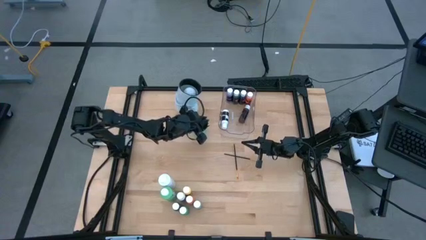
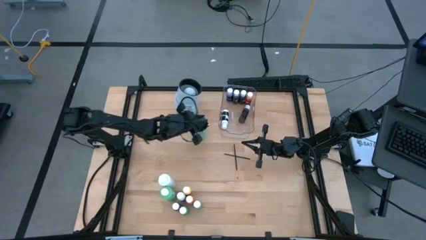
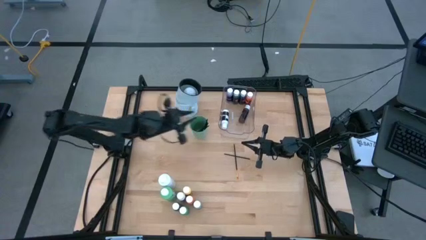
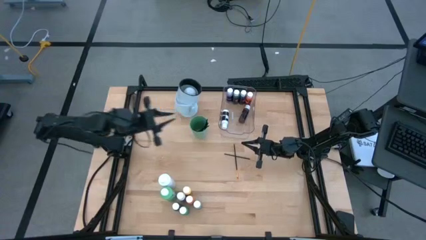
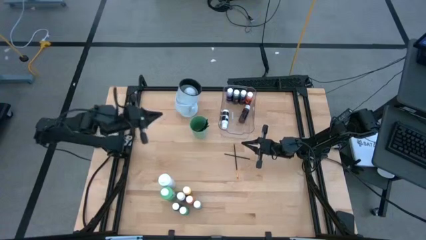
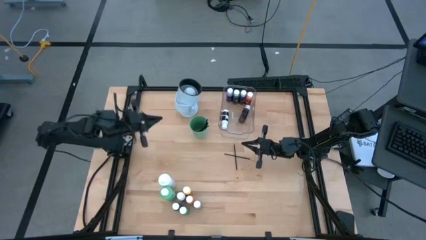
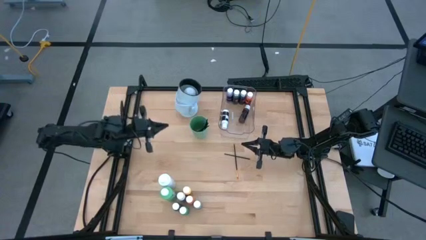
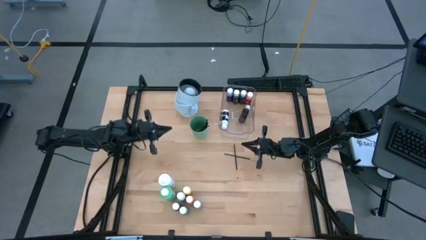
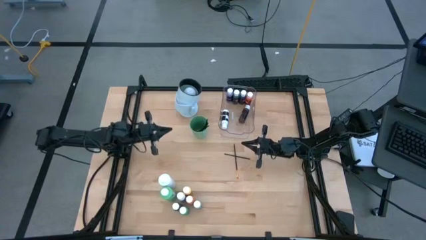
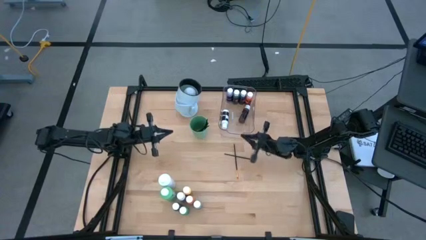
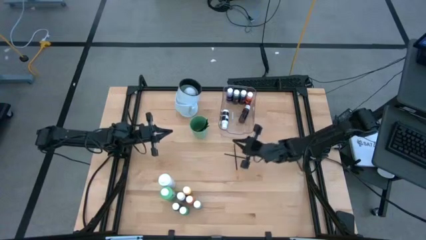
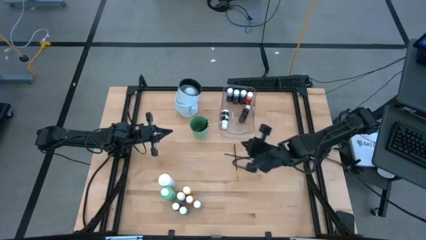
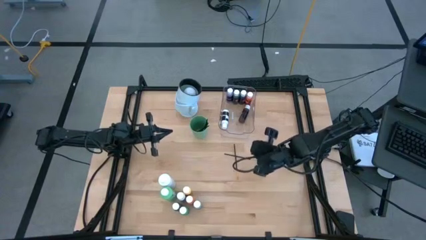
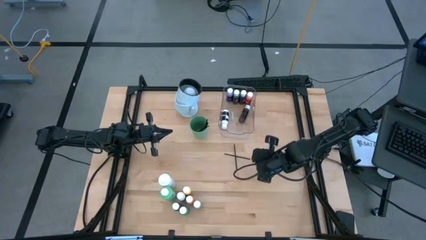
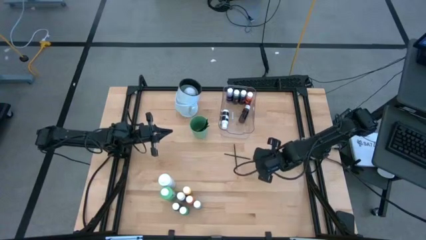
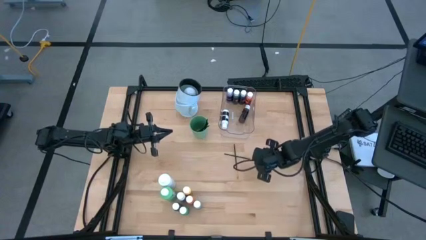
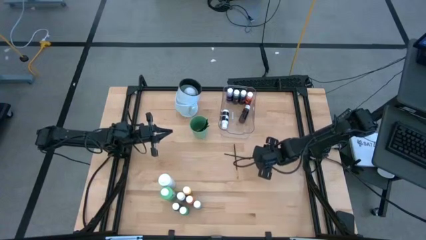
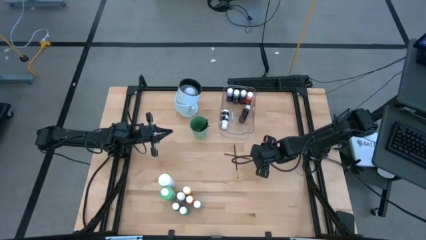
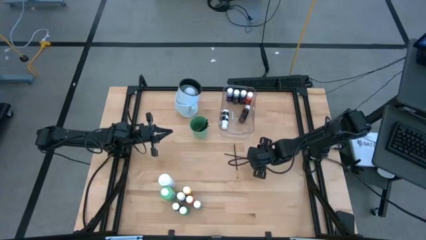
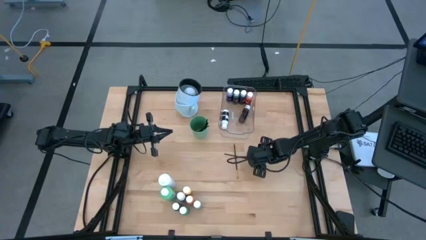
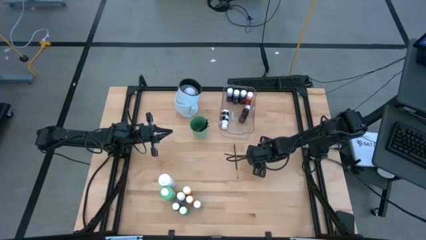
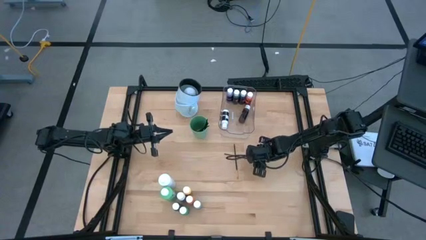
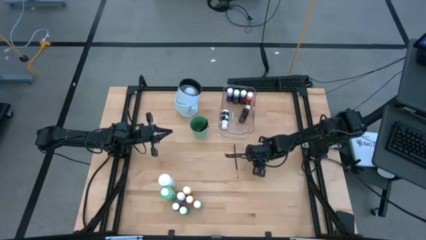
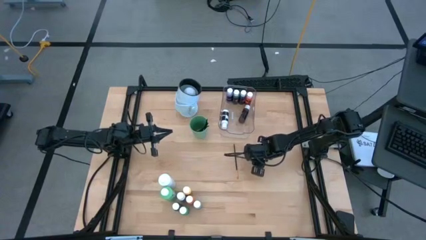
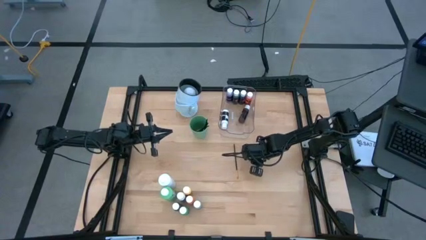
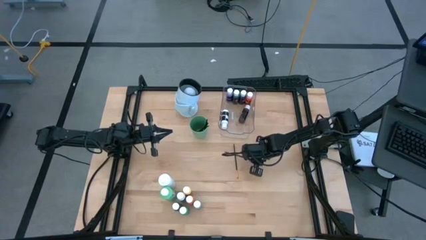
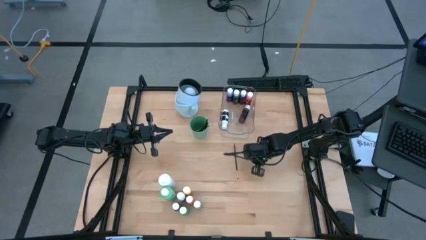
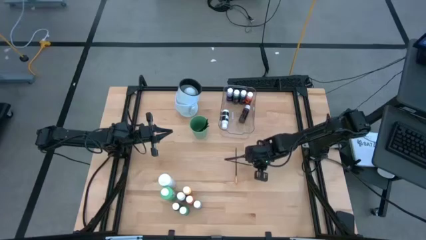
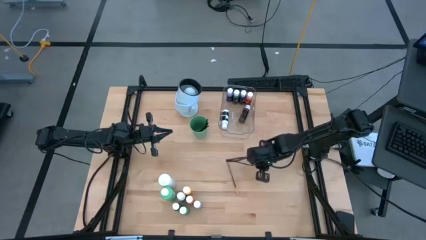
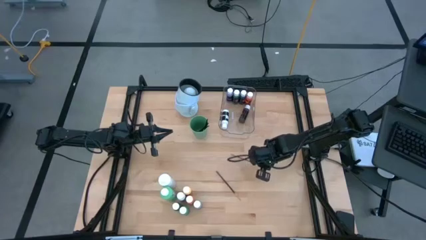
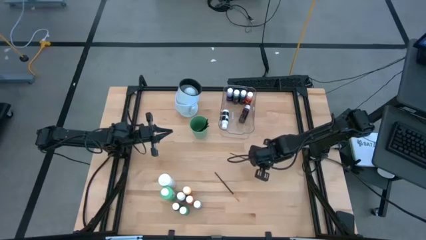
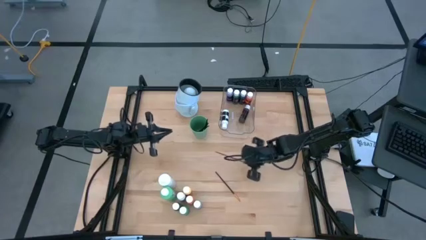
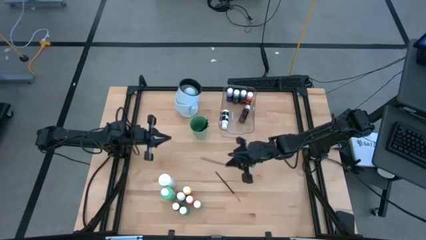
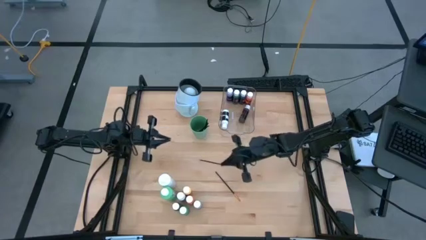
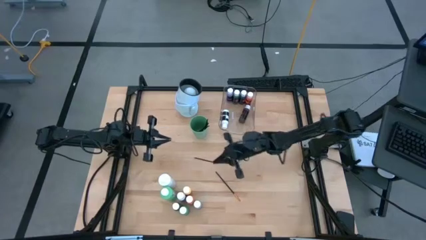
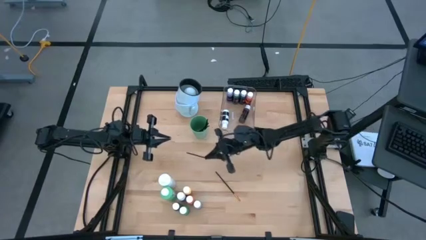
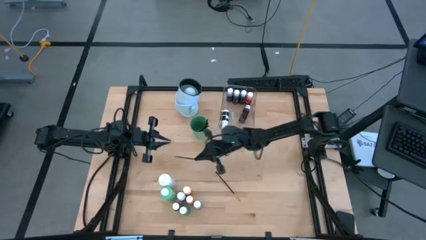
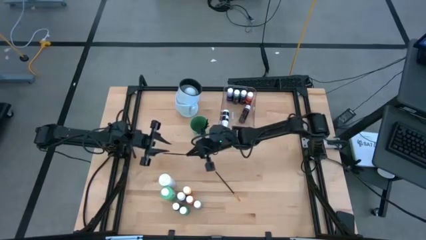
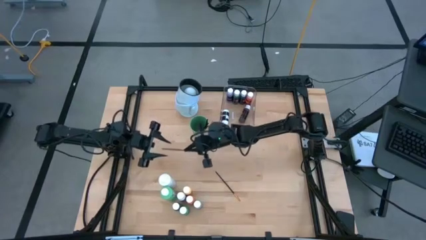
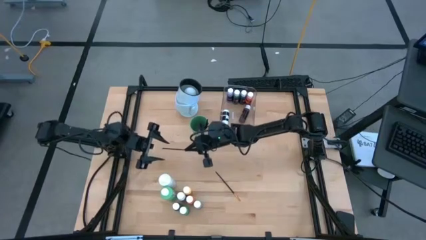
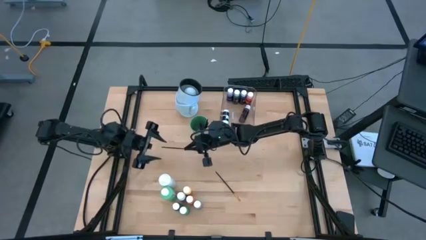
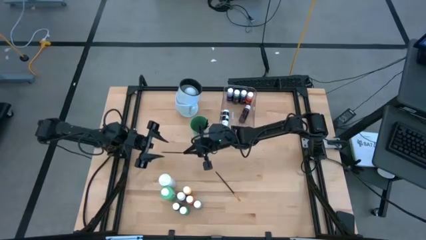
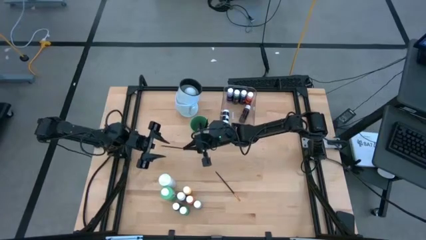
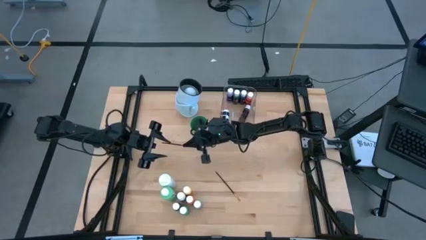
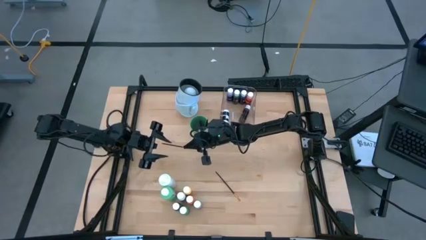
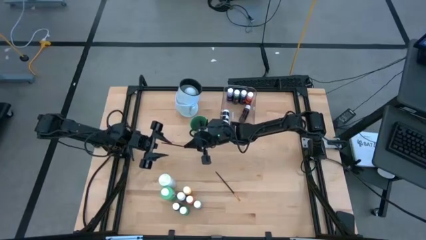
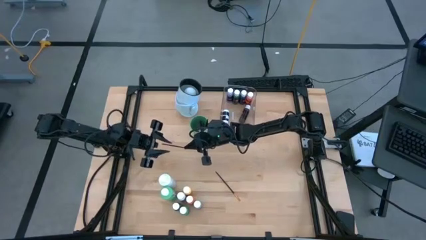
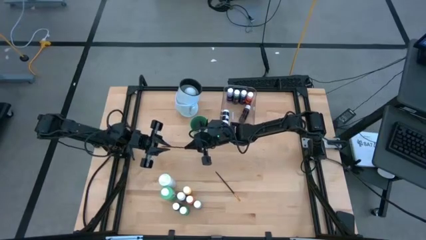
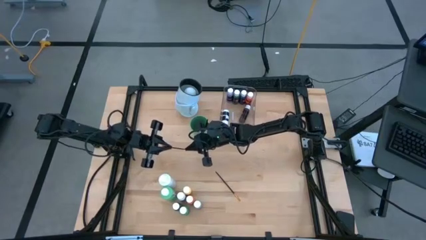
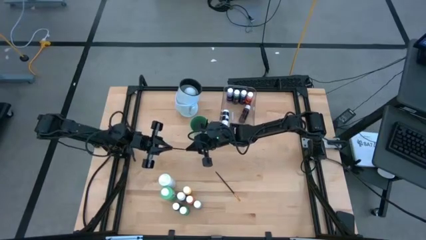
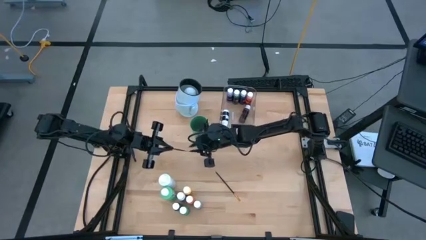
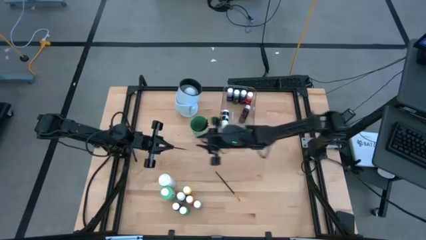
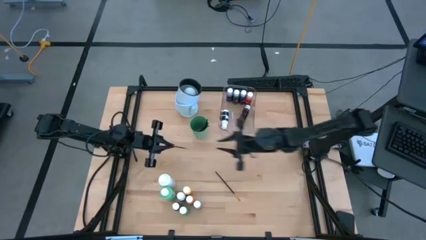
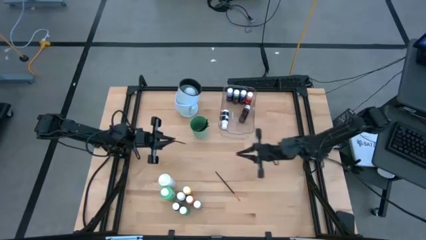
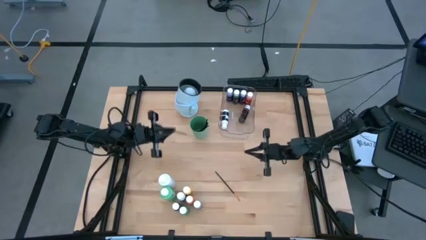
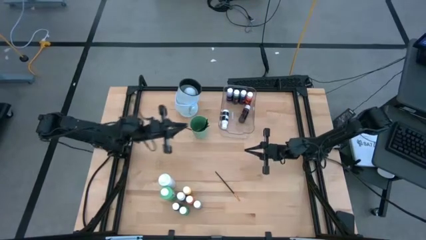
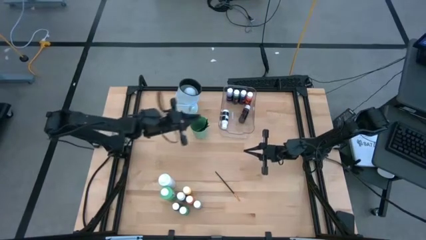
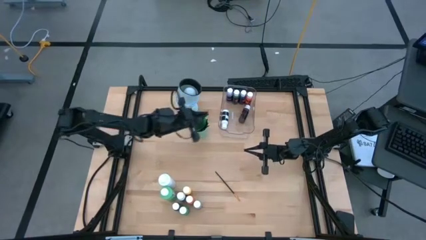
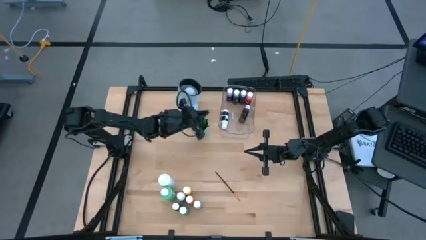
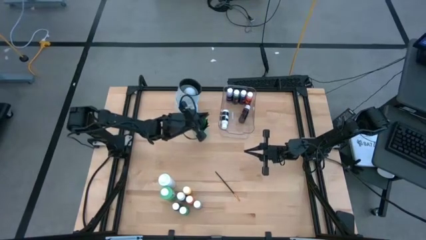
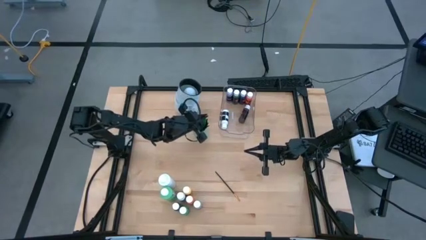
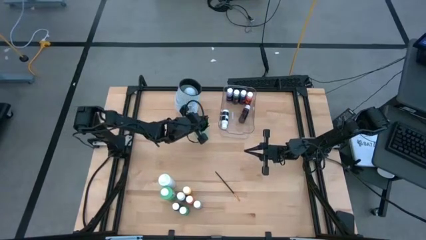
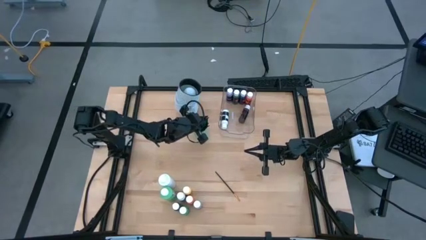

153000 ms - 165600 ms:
Task: Pick & Place Paint Supplies
Put the gold paintbrush into the green cup
